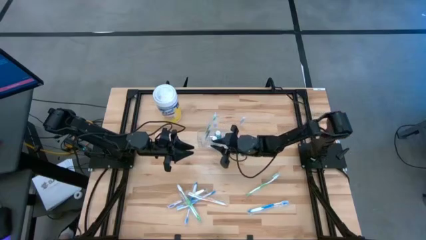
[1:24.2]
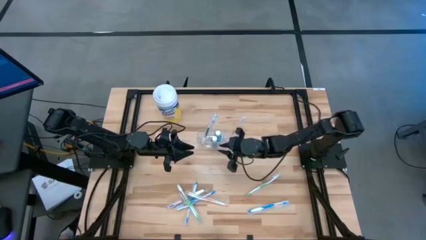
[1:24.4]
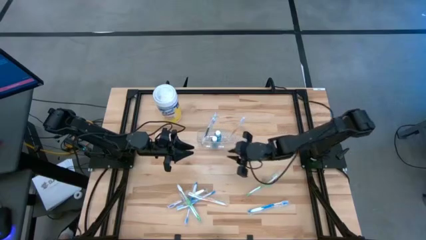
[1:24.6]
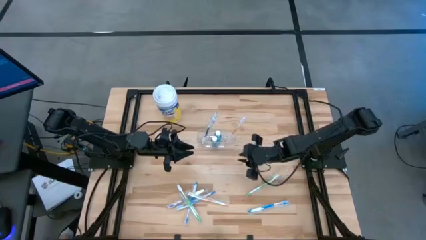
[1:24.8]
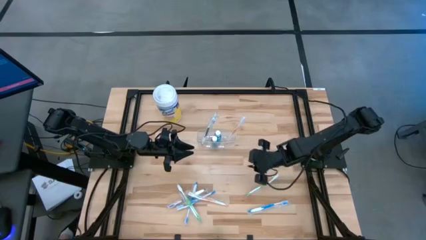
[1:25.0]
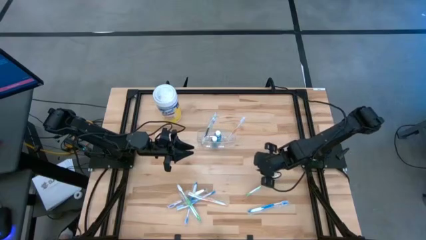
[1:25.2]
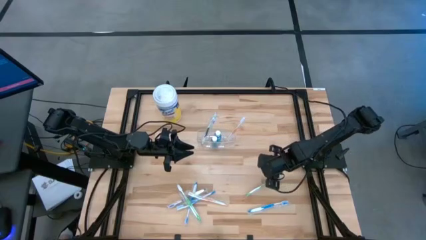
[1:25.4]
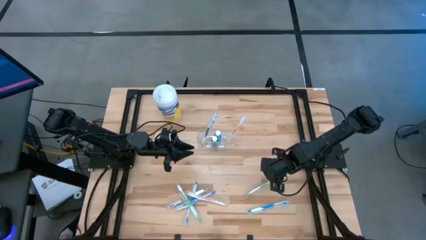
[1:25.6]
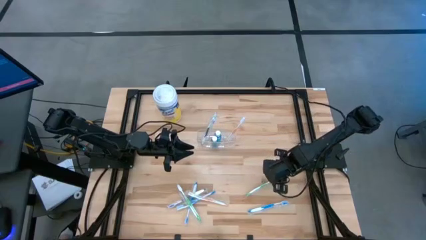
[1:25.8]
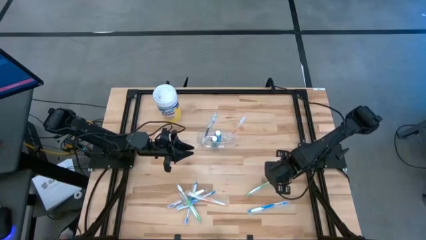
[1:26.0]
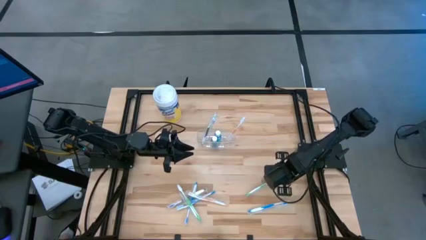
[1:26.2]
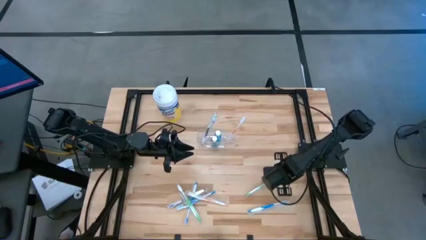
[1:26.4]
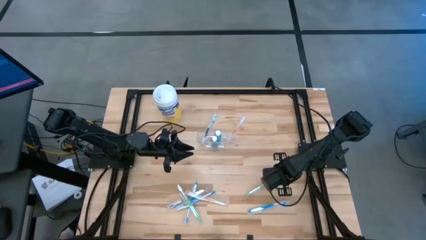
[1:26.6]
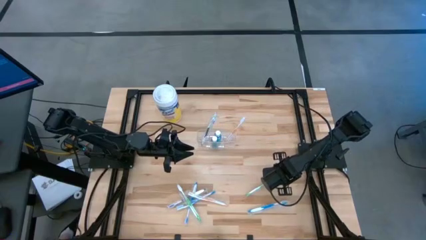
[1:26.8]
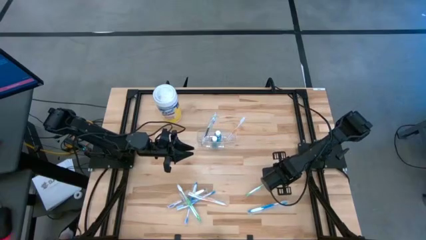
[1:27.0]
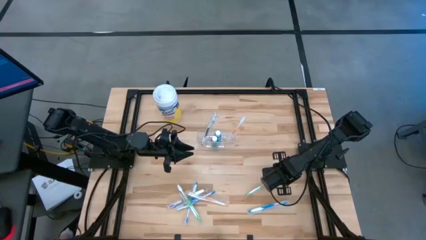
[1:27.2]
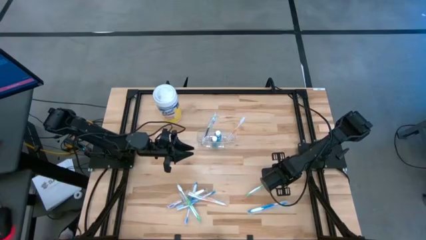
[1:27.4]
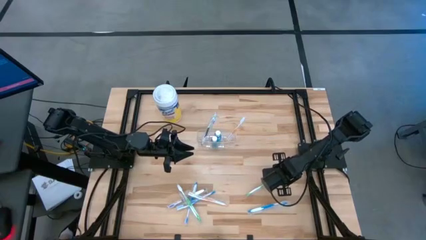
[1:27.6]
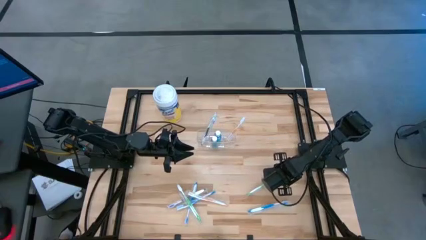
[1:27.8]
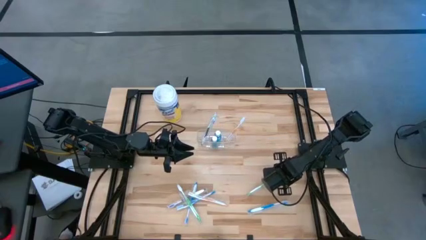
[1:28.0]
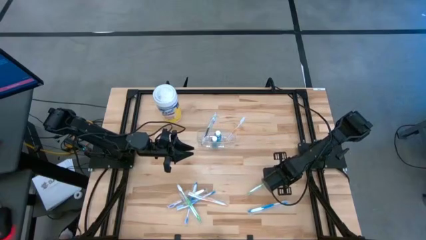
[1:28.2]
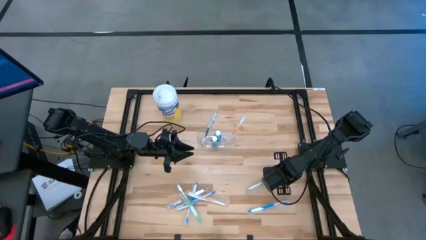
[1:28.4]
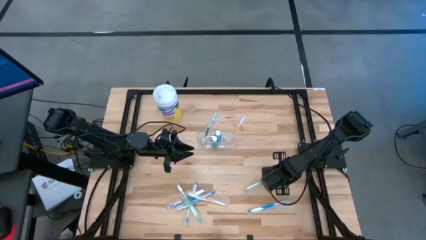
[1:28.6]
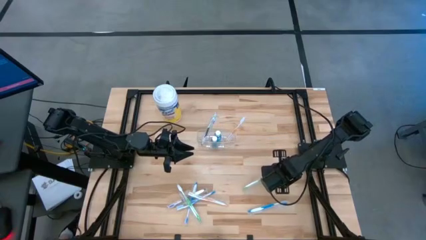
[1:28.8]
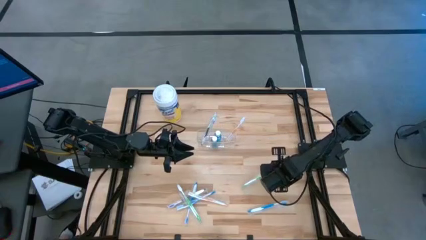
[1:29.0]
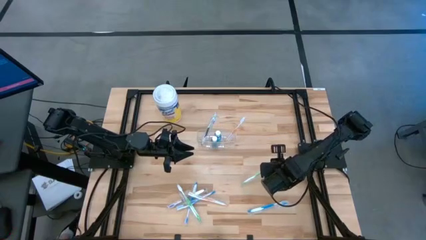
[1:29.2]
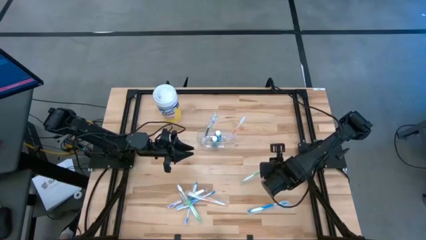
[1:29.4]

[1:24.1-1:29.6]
Task: Pick & Place toothbrushing station
Put the right green toothbrush into the transparent organizer

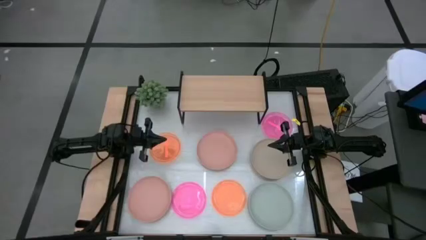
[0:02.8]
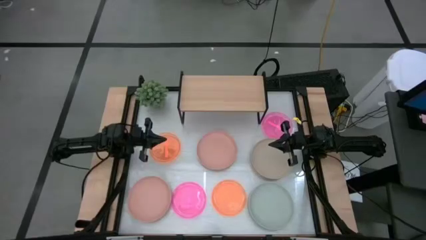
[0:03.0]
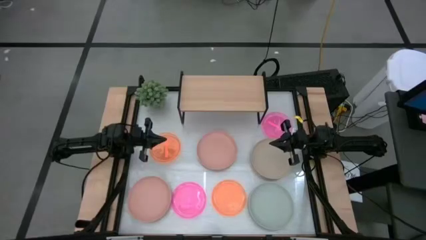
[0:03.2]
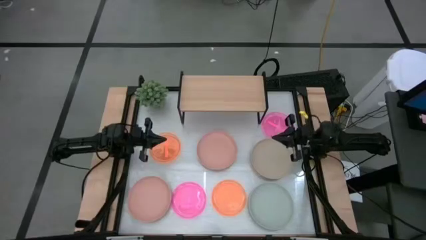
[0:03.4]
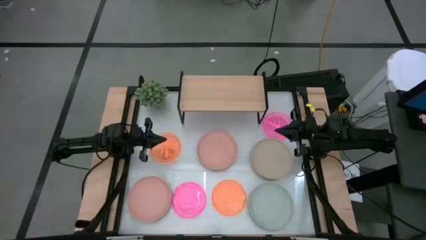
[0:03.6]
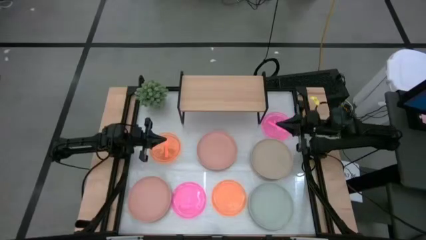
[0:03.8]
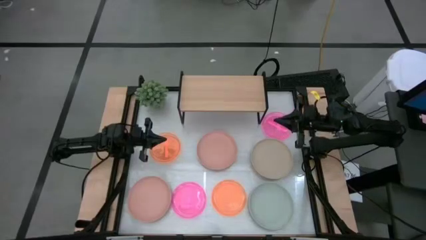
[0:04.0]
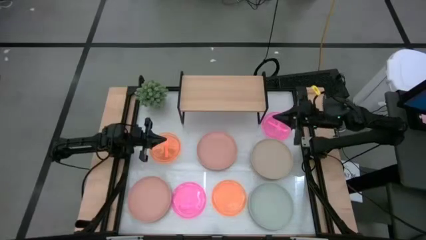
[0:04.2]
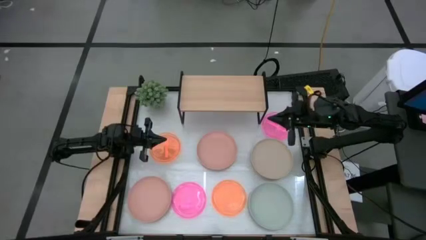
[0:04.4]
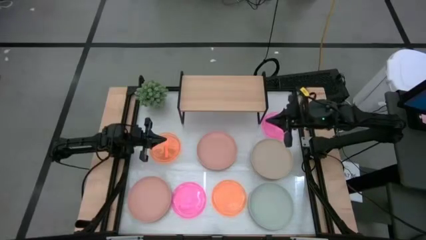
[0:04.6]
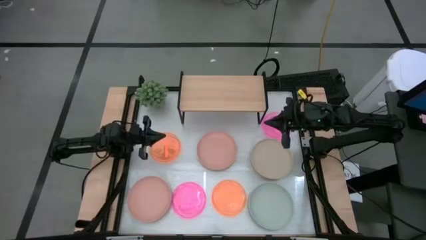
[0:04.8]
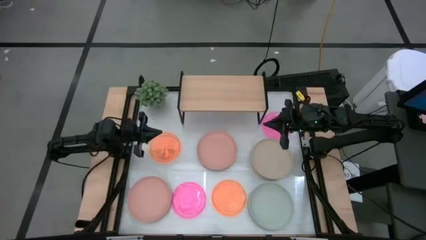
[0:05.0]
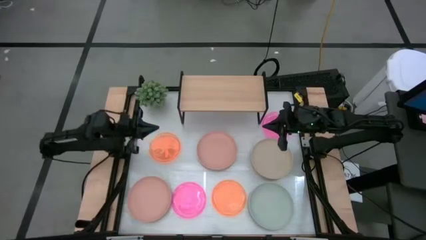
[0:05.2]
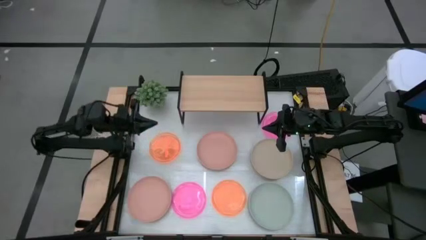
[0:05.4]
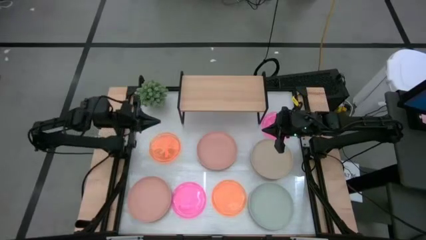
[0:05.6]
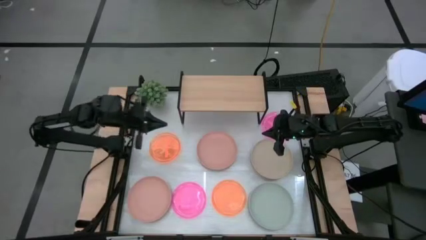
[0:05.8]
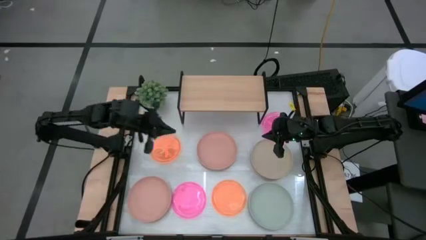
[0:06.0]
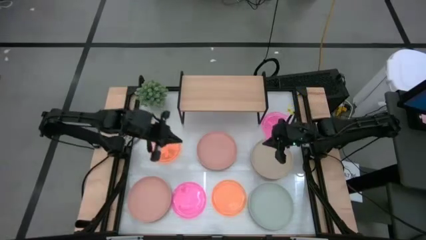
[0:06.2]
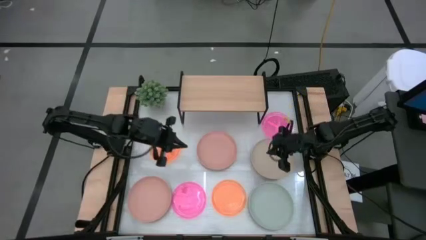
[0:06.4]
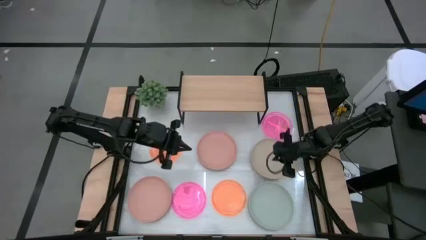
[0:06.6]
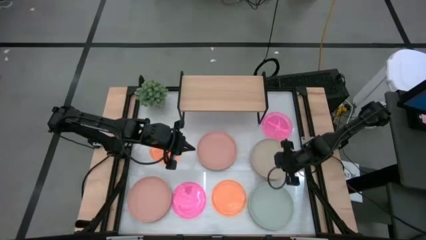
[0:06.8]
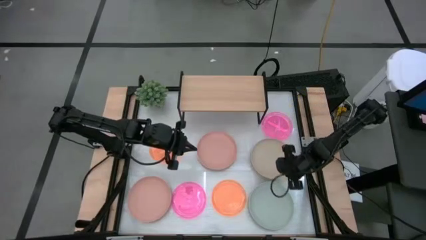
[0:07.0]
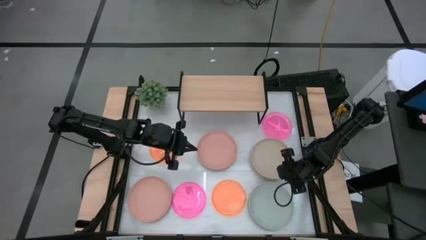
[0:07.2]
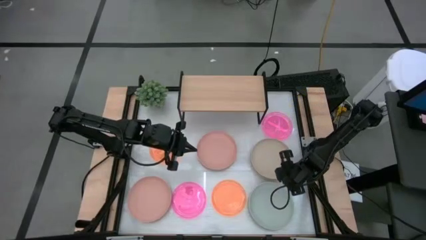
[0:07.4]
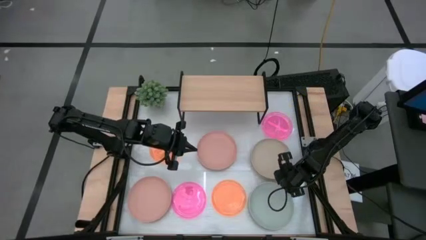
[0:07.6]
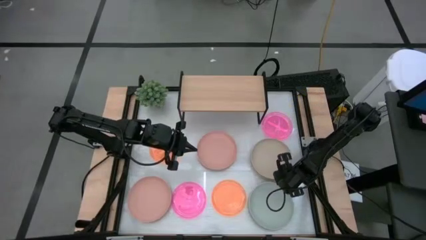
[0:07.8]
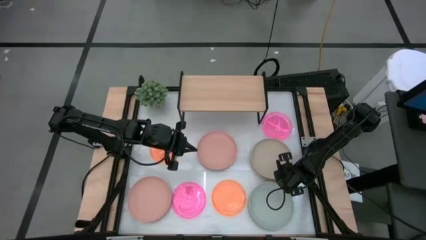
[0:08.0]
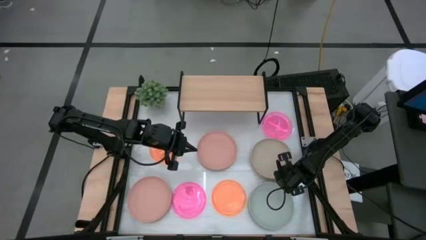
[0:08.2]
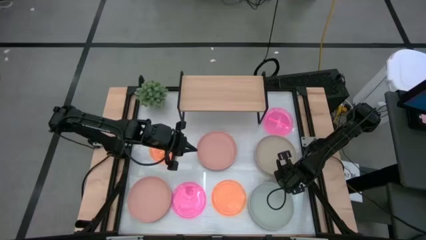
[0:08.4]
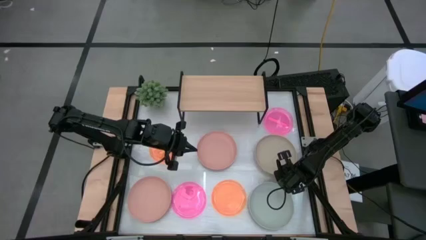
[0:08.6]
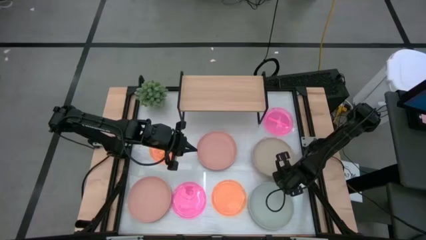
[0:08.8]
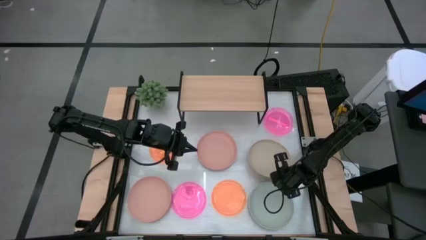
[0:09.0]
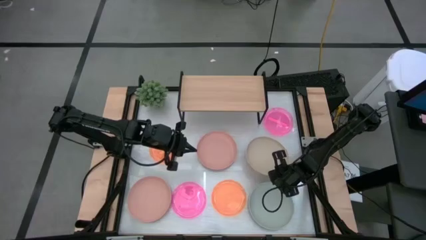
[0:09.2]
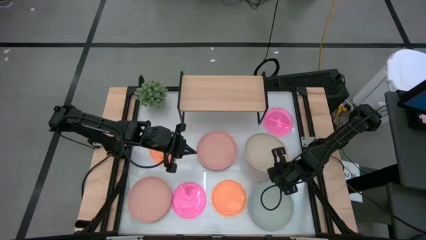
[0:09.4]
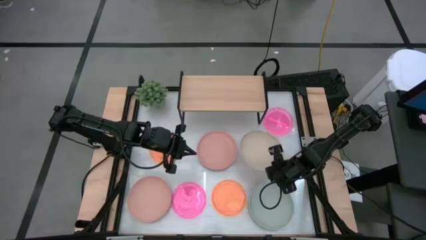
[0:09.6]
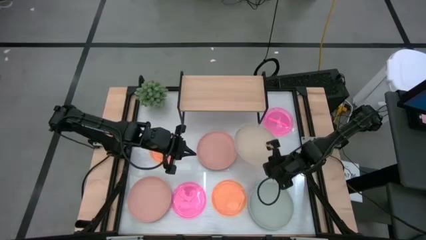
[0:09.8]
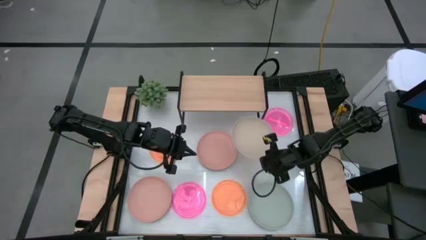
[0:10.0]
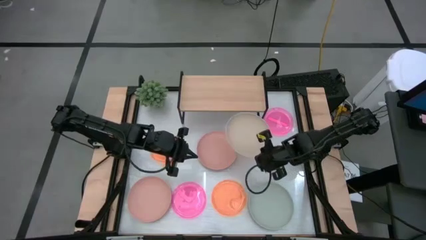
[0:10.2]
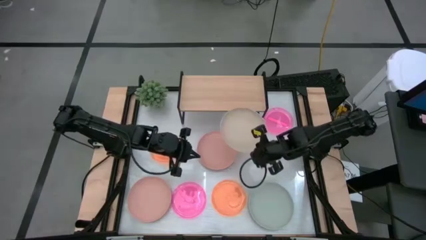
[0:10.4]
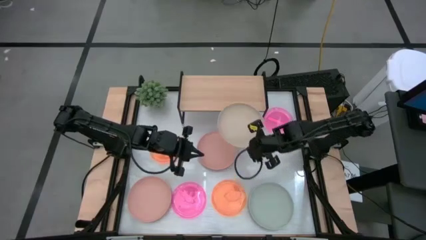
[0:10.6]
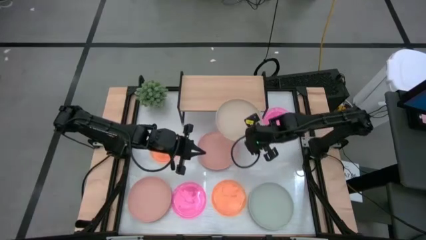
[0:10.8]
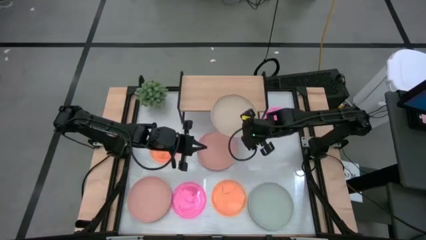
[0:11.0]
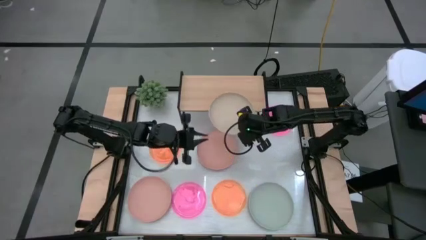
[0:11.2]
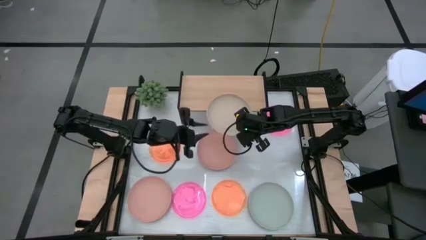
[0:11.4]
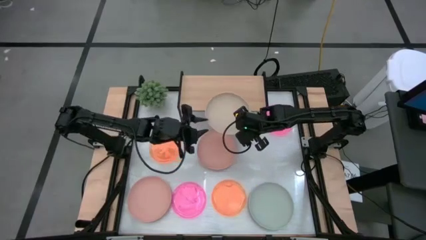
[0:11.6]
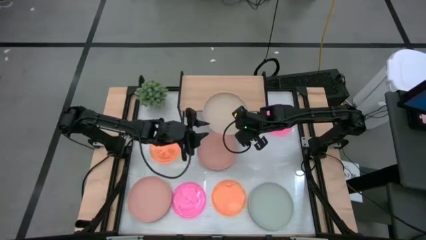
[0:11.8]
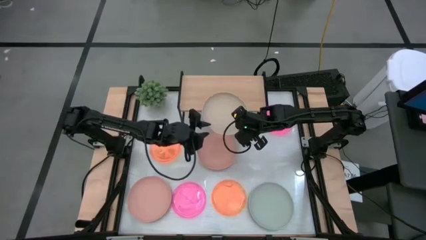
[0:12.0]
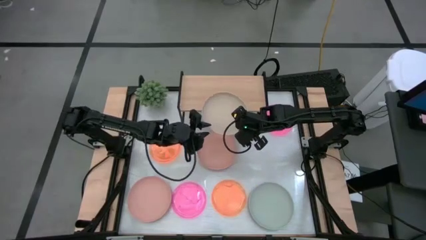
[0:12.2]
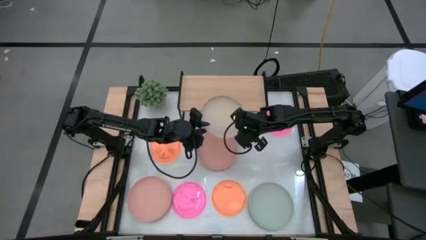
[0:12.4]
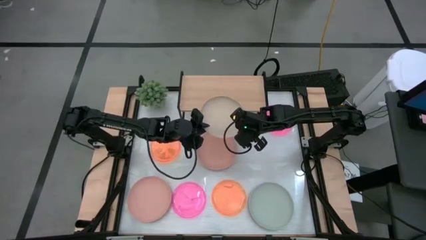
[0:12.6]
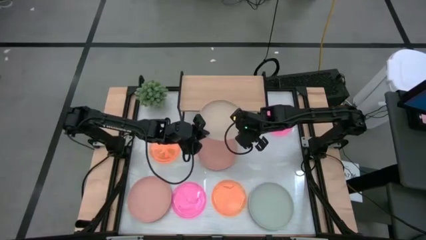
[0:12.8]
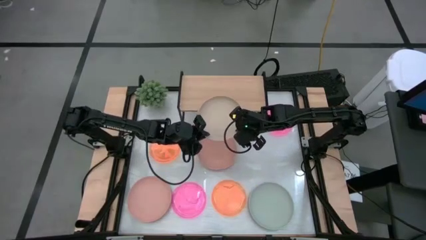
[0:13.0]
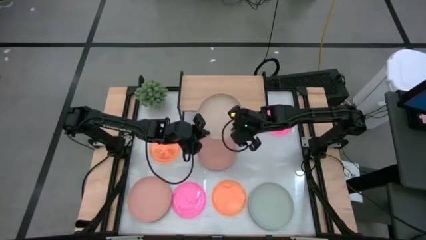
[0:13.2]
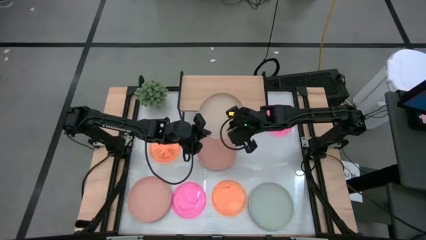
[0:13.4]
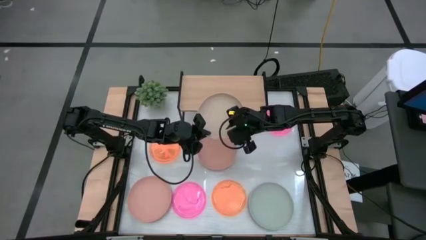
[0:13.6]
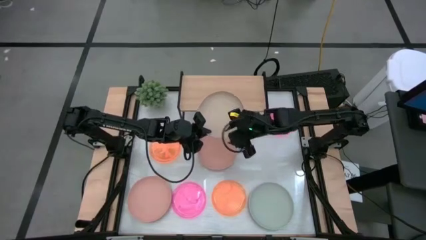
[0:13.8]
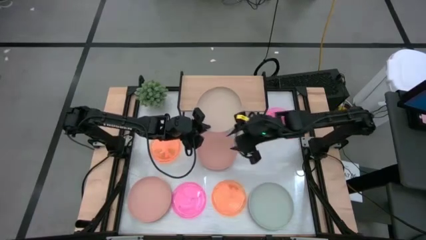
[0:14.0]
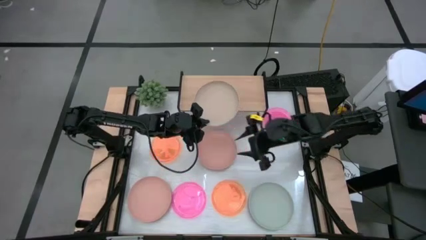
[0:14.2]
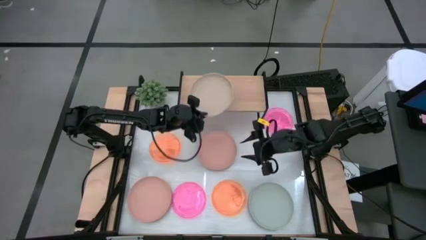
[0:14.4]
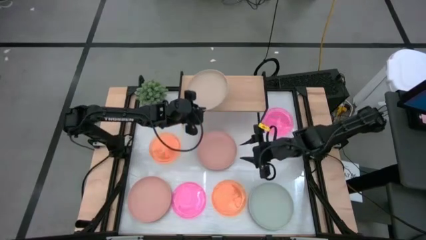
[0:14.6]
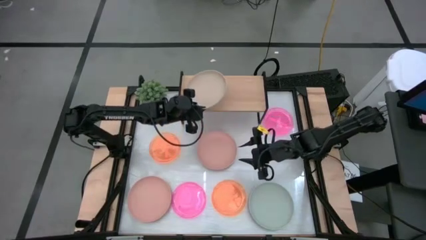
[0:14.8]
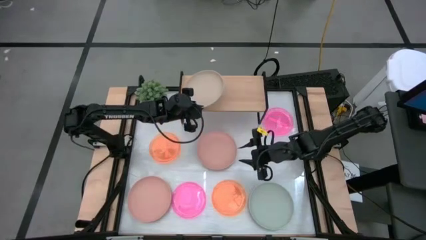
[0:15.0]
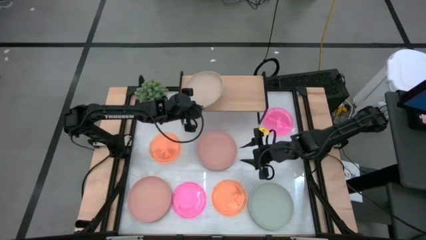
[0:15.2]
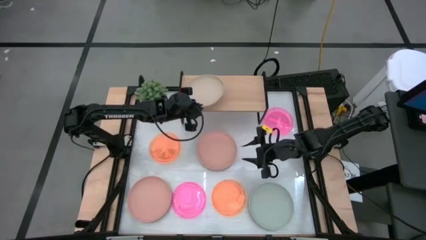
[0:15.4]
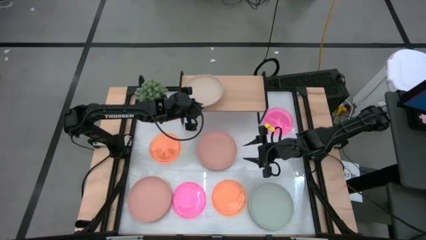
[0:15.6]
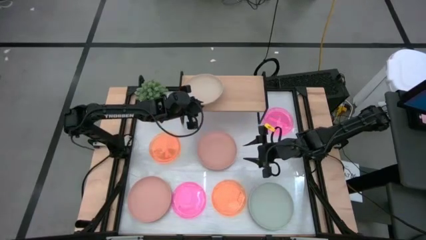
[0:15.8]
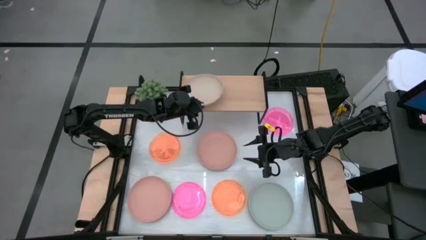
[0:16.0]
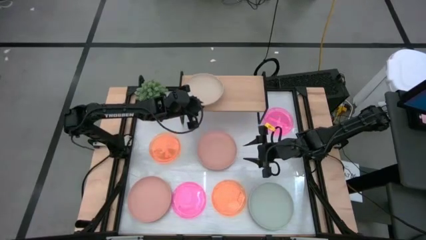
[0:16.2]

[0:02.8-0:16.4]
Task: Place and stack plates onto a shelf
Put the white plate on the shelf
